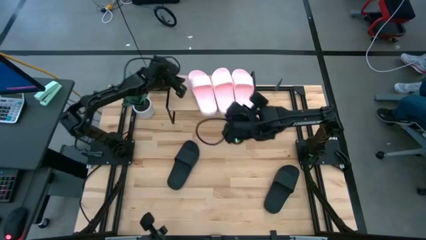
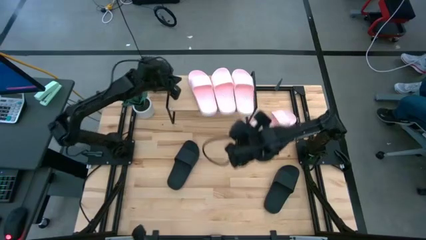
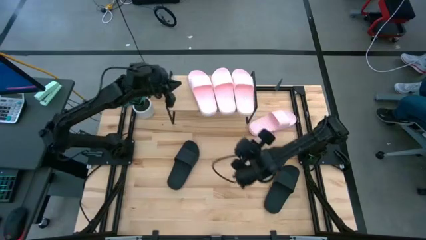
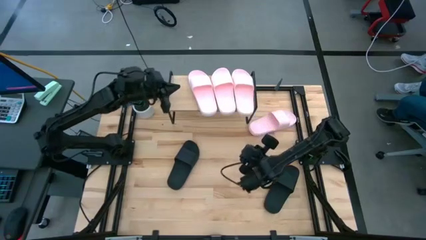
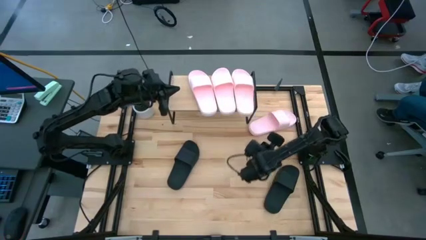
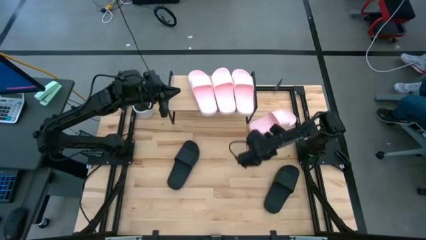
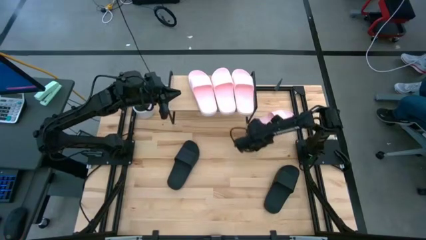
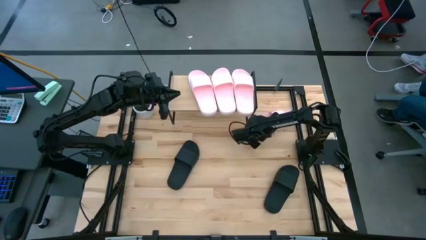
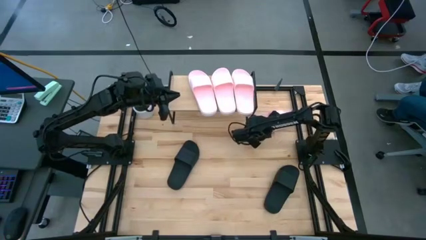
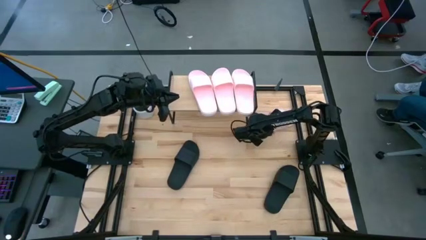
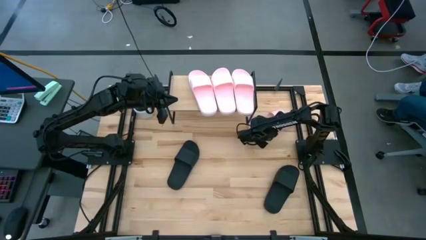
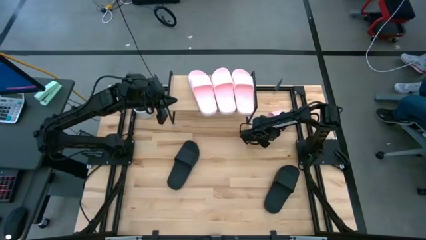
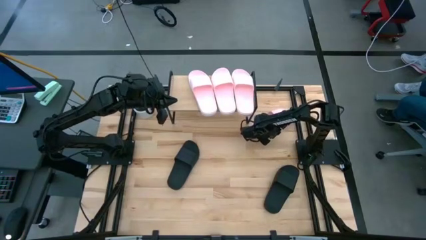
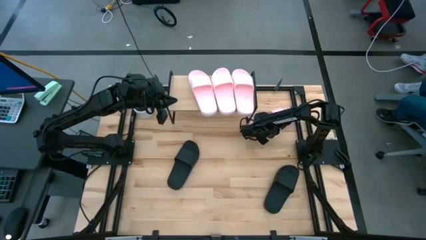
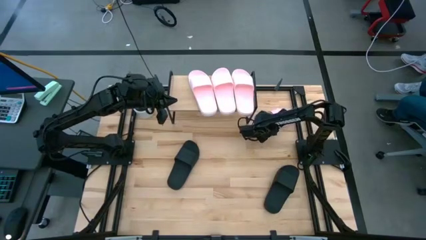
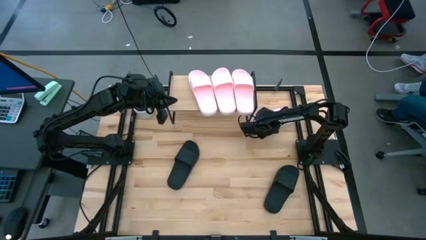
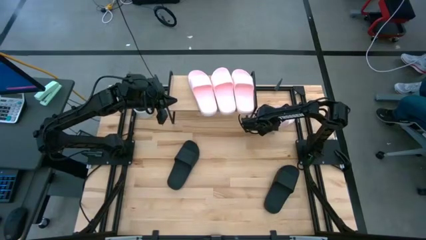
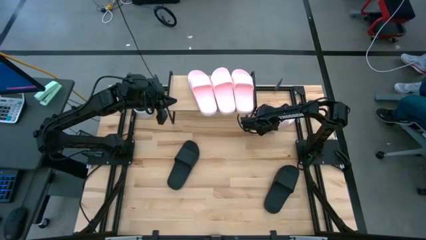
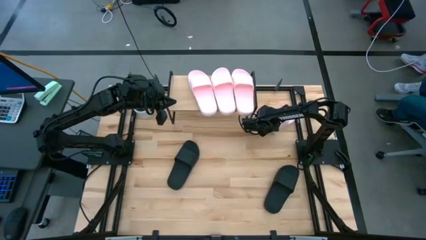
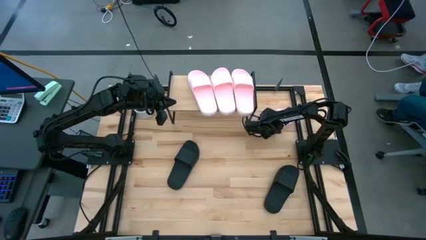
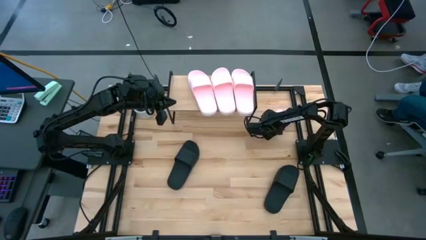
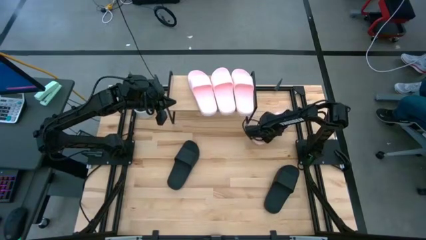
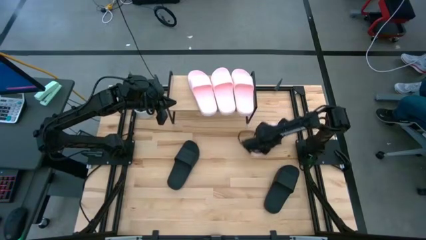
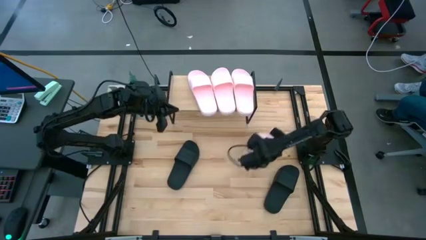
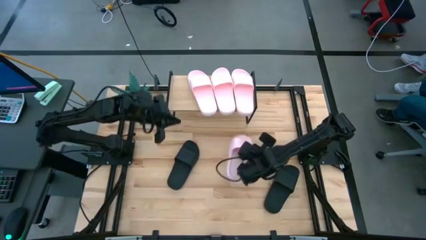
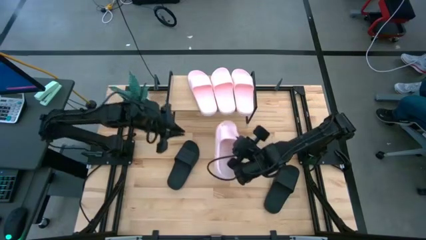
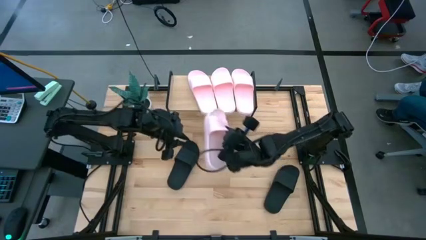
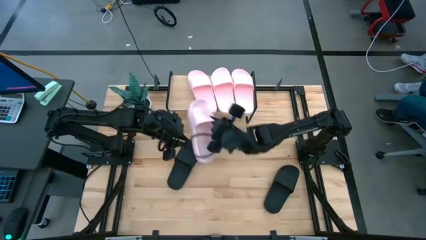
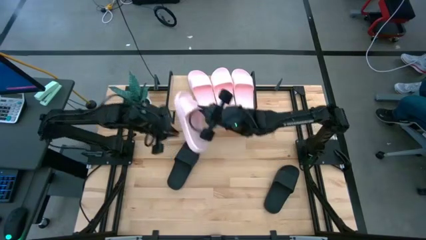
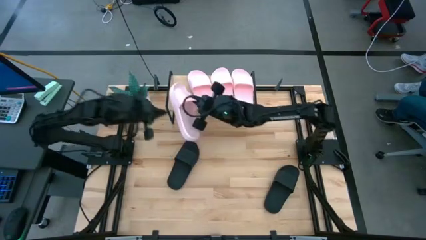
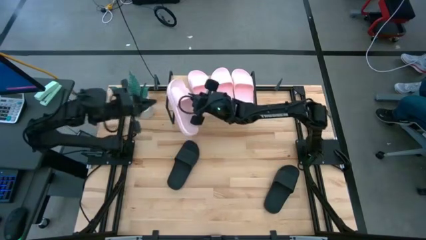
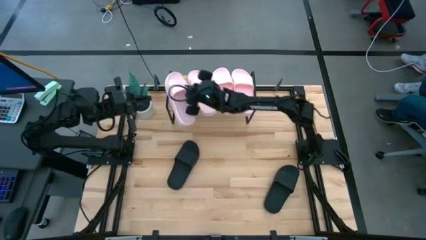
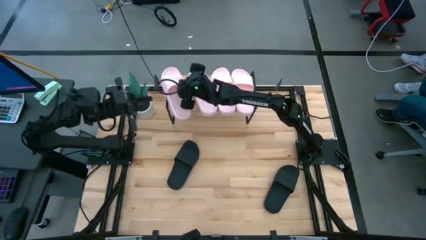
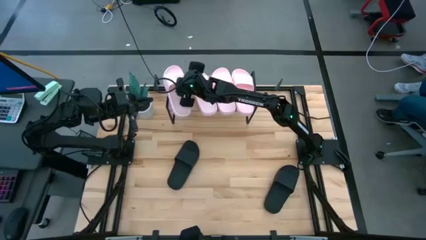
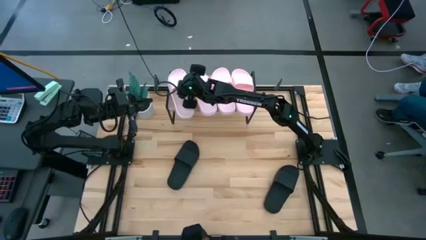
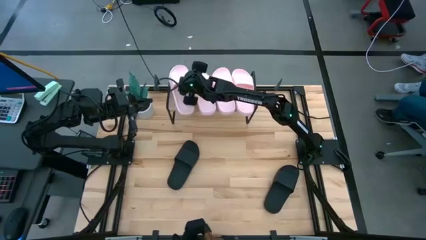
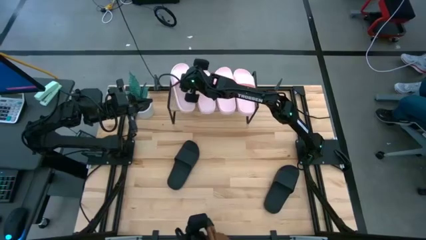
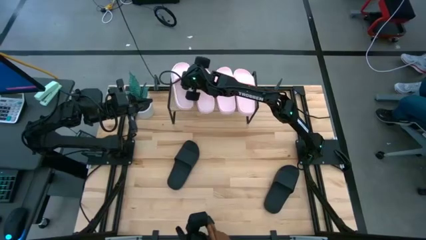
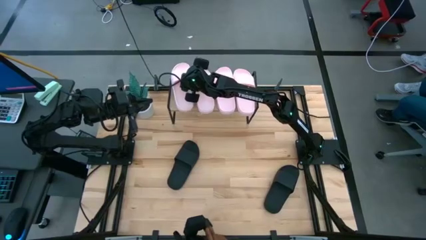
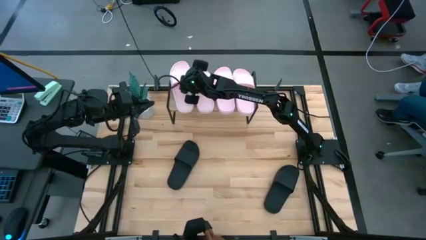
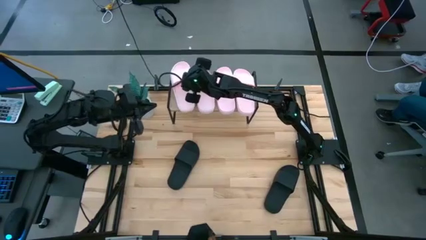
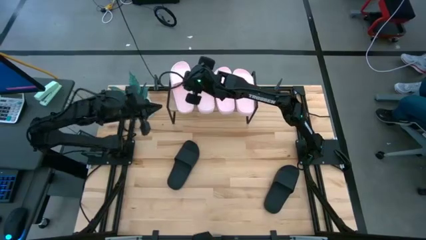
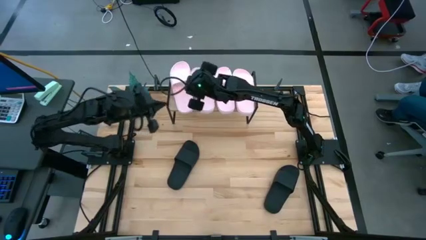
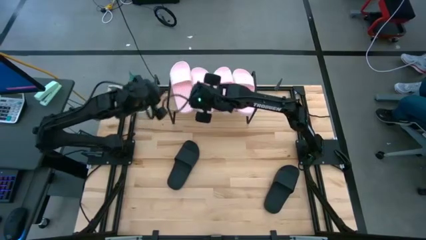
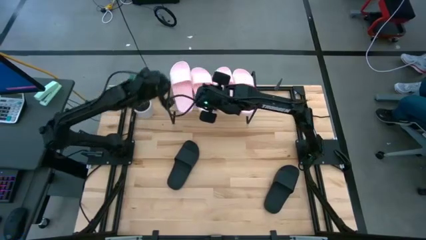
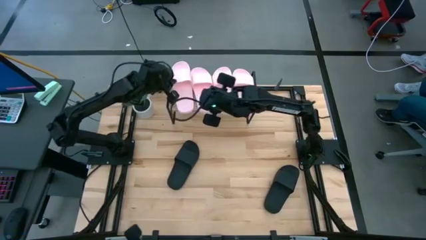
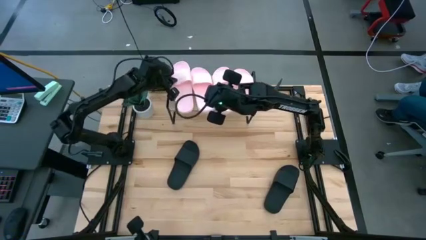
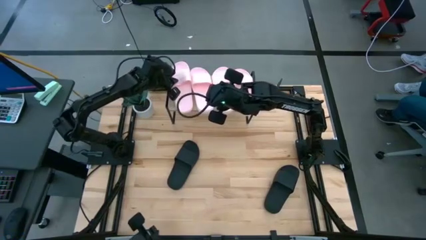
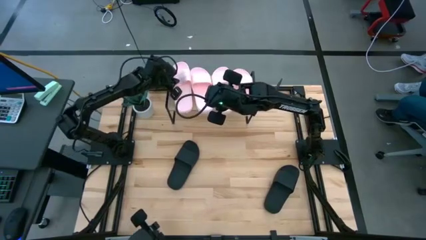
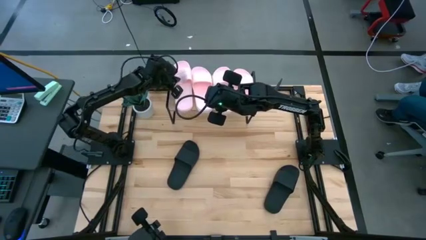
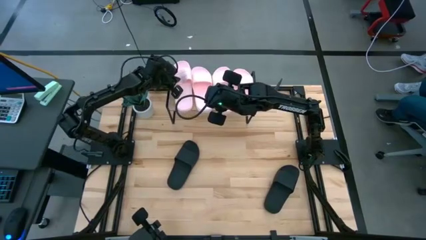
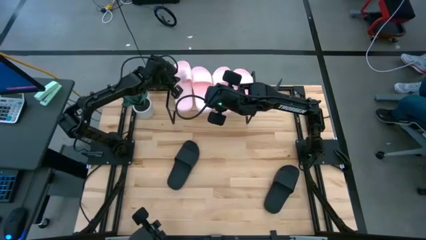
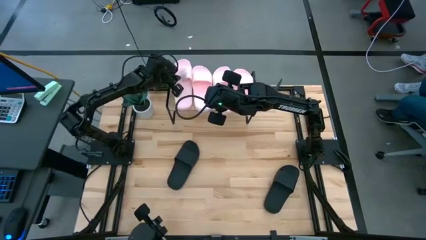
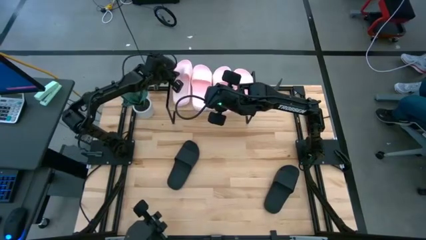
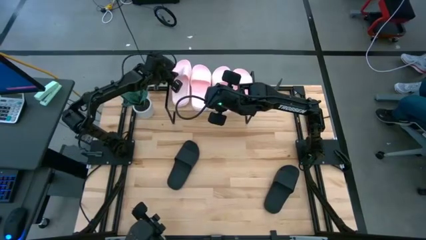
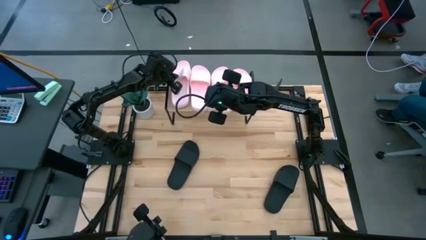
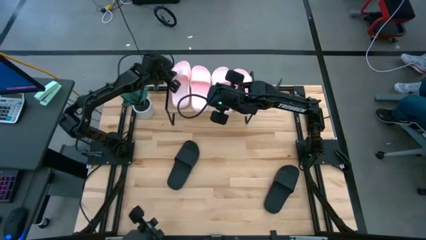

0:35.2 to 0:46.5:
Task: Pick and place slides into the shelf
Put the pink slides on the shelf

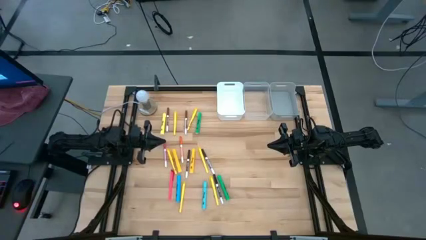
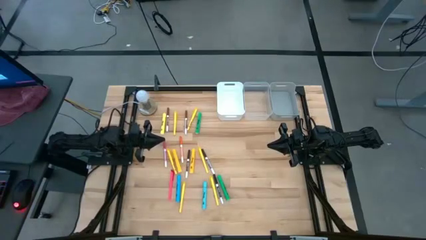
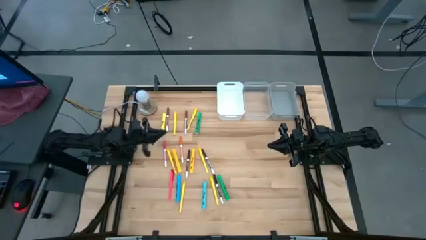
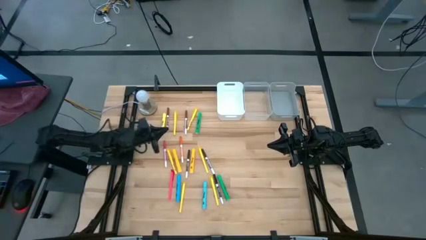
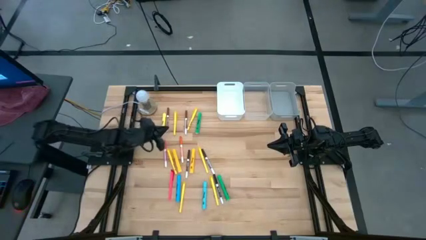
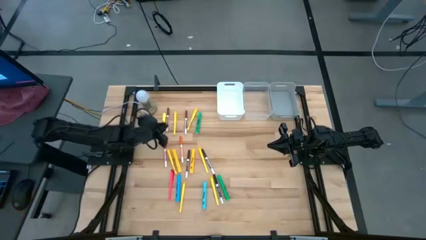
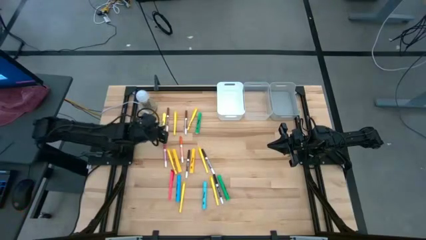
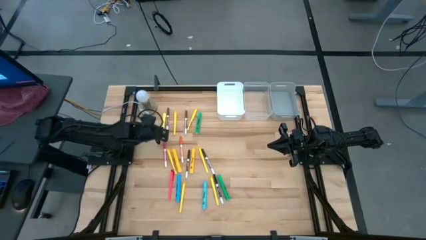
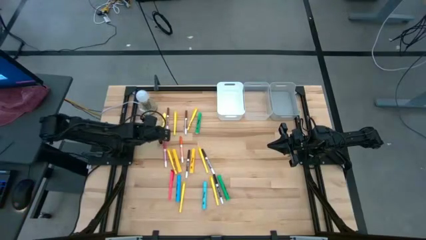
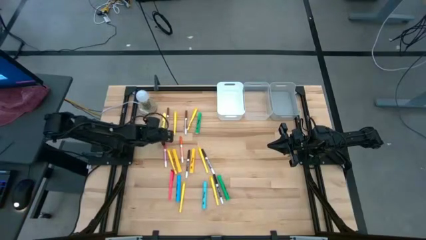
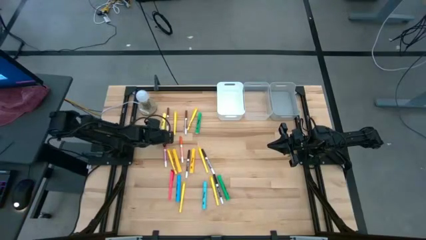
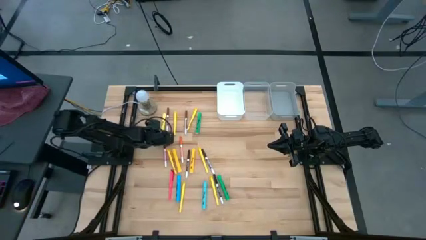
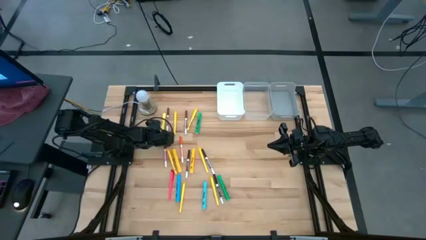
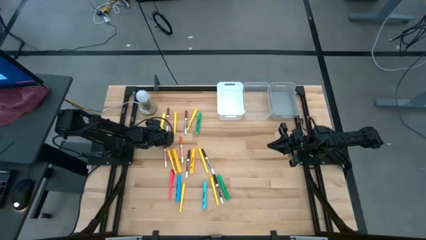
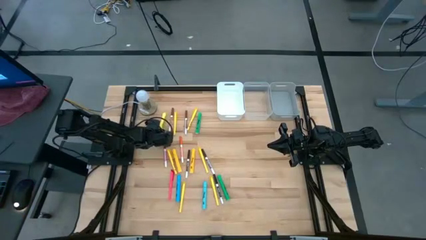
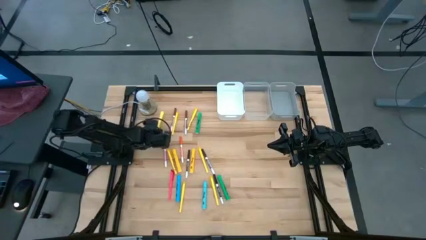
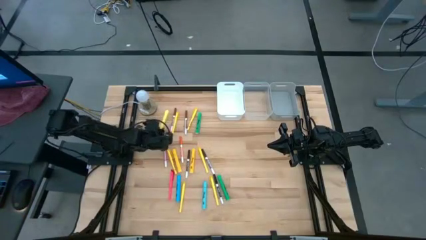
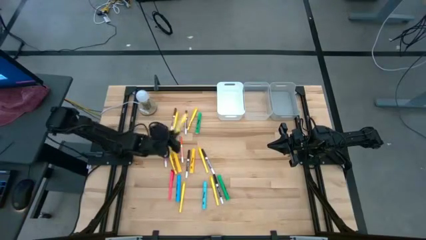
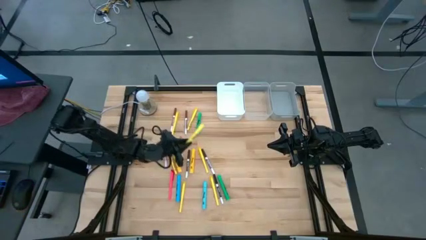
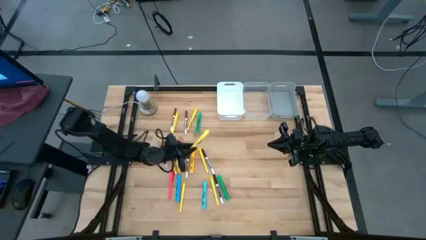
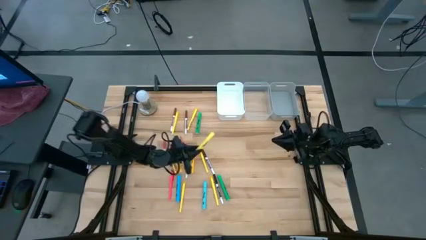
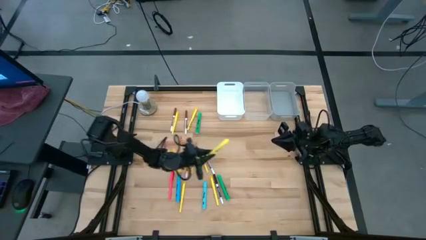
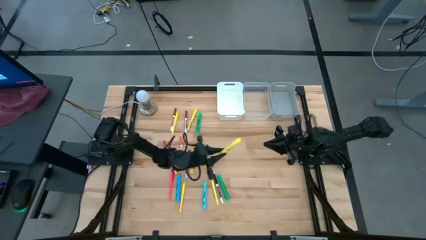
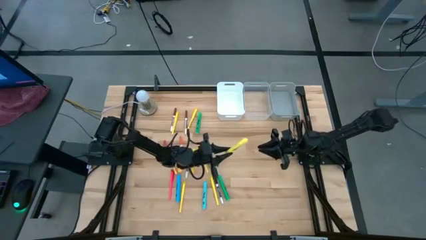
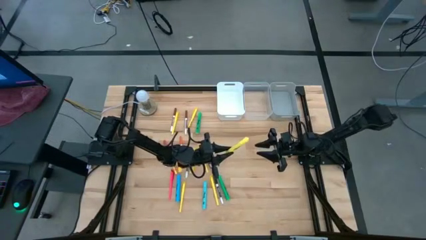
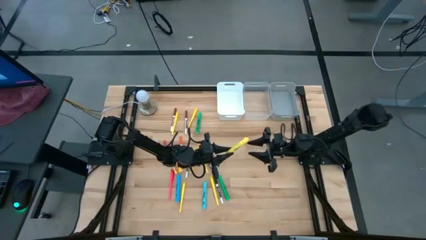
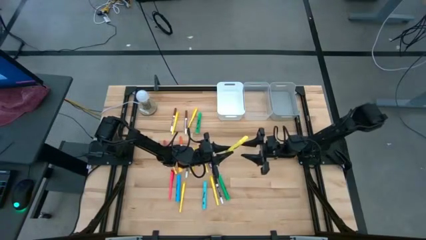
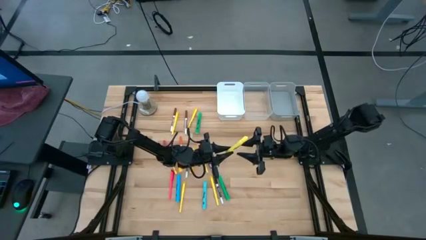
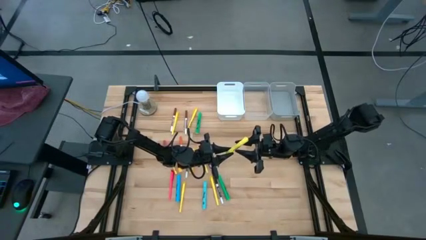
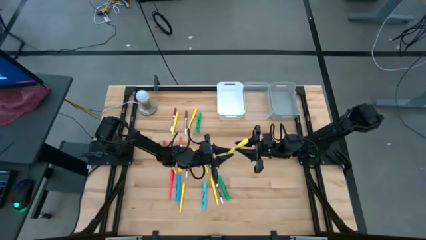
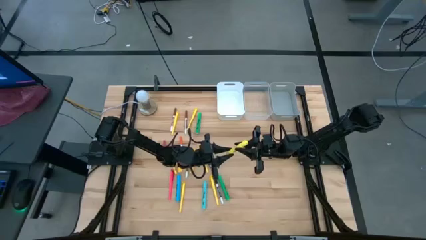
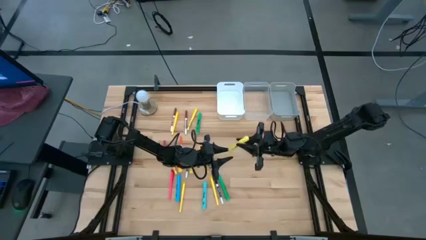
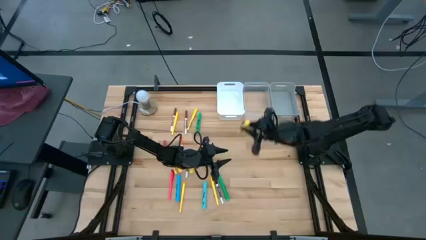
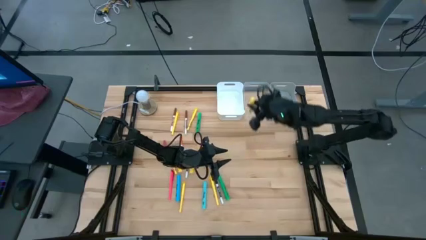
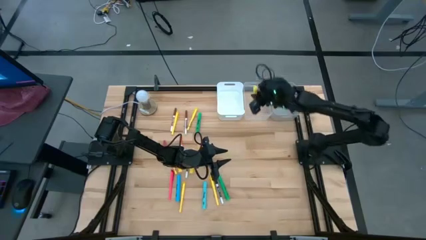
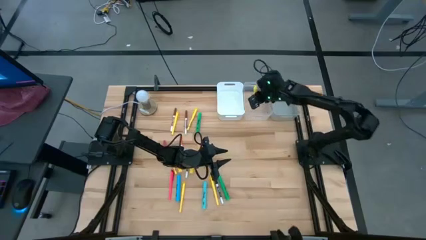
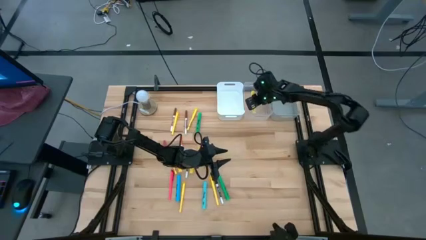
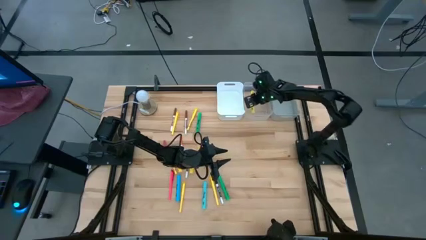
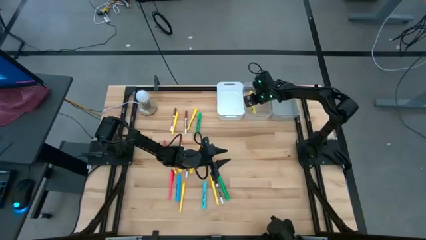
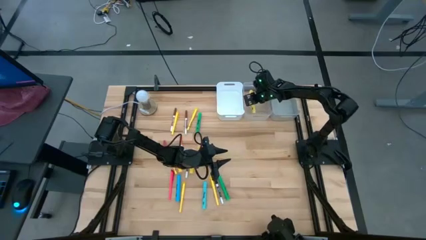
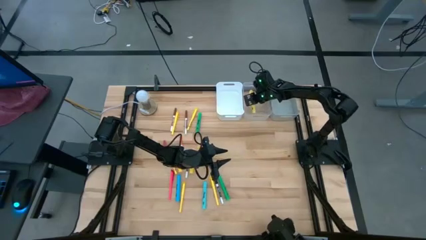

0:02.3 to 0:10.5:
Task: Pick & Place Markers
Put the top yellow highlighter pen into the transparent bin
